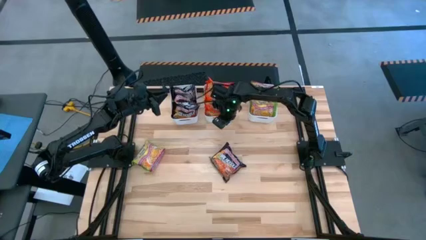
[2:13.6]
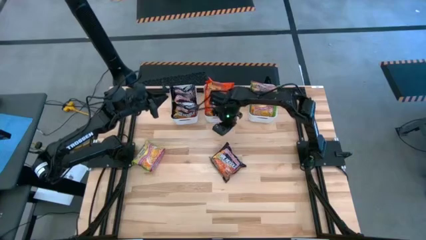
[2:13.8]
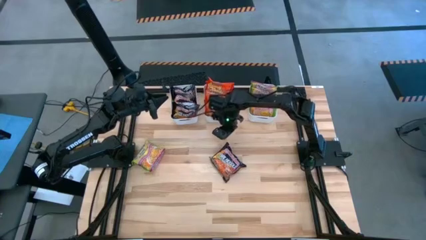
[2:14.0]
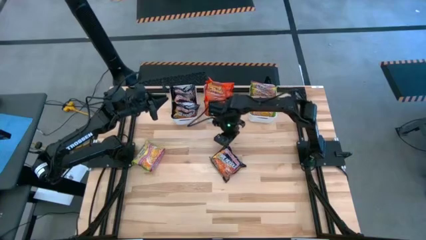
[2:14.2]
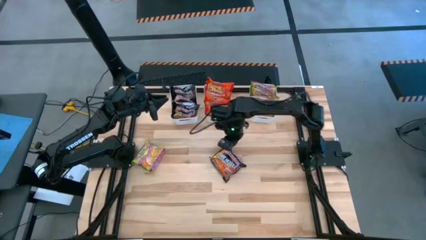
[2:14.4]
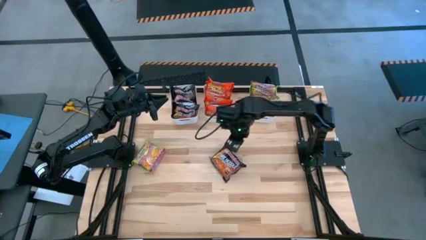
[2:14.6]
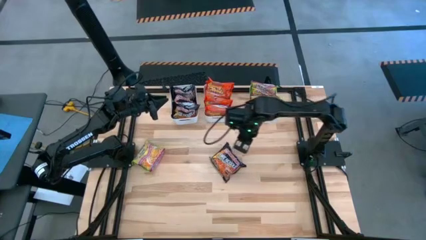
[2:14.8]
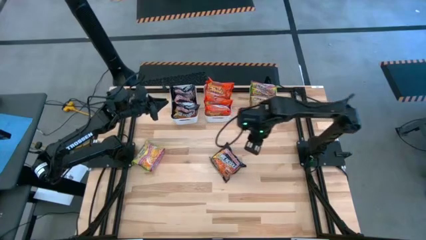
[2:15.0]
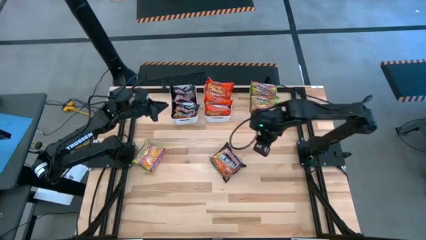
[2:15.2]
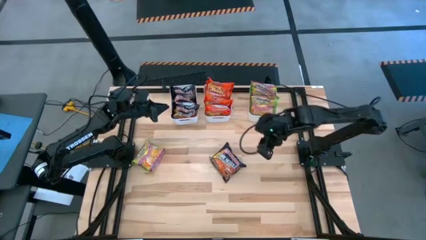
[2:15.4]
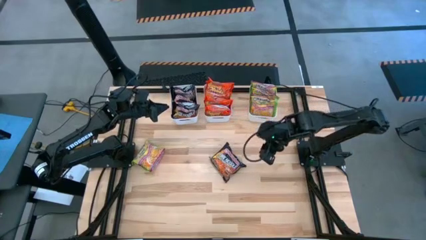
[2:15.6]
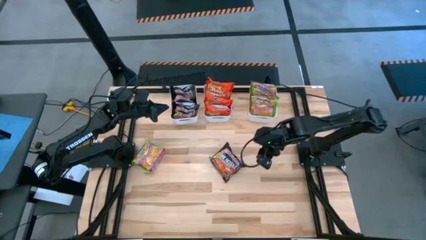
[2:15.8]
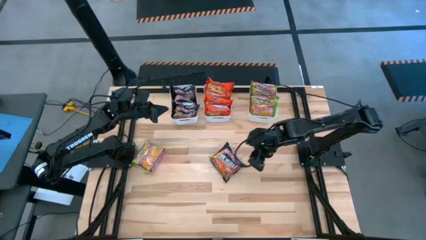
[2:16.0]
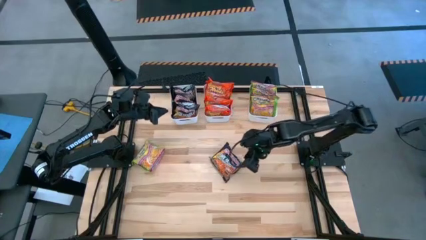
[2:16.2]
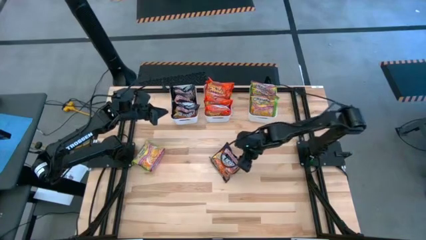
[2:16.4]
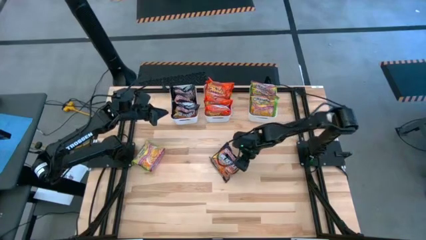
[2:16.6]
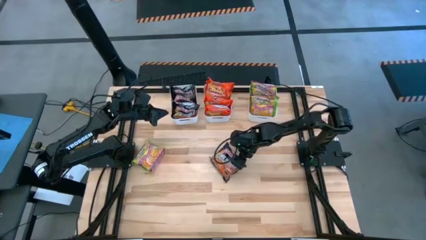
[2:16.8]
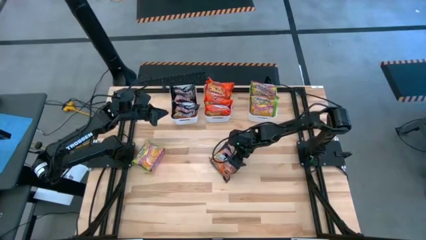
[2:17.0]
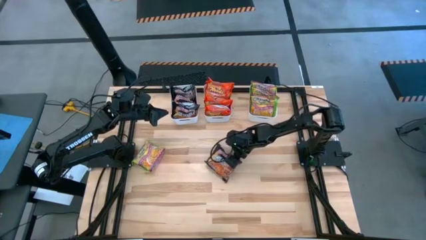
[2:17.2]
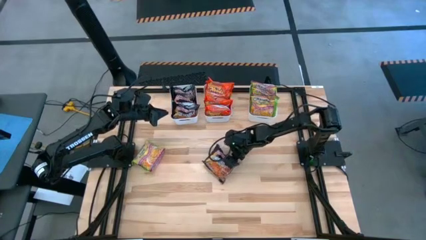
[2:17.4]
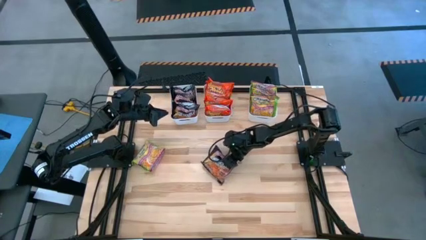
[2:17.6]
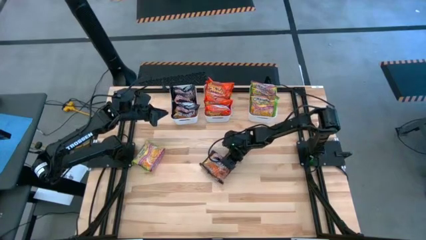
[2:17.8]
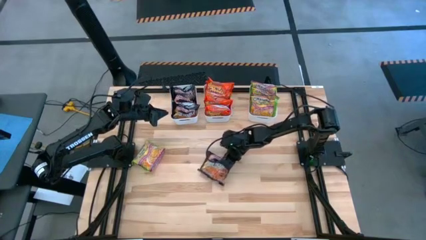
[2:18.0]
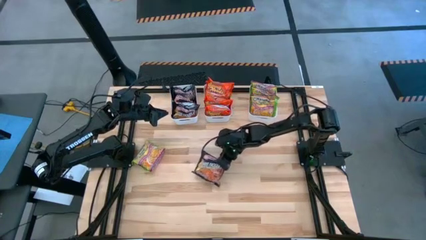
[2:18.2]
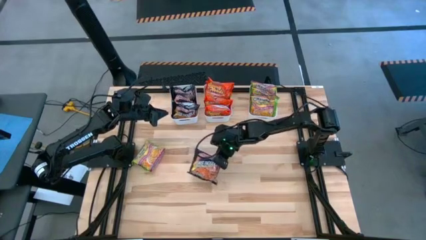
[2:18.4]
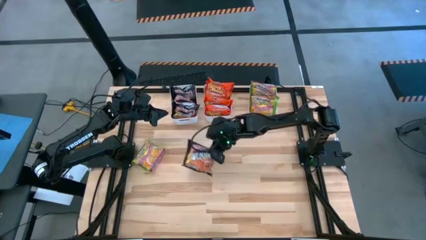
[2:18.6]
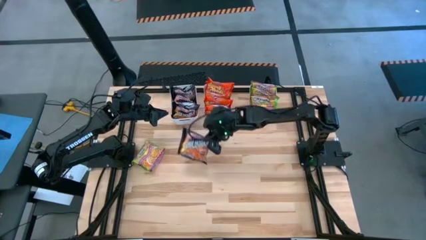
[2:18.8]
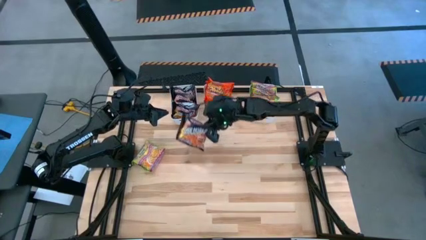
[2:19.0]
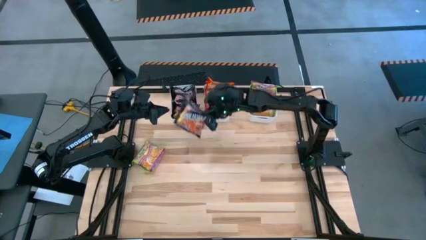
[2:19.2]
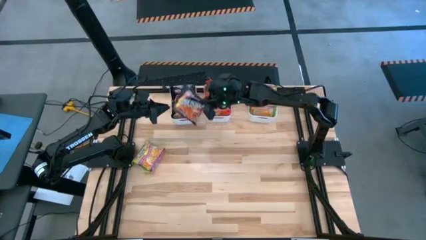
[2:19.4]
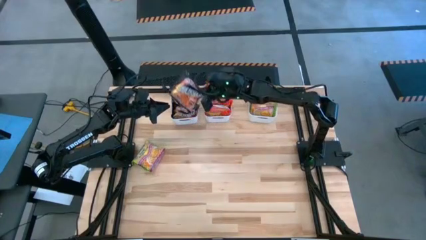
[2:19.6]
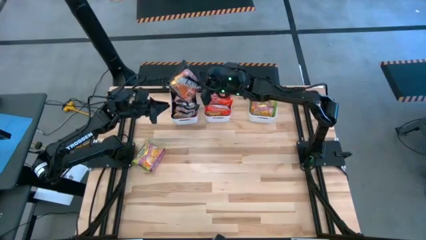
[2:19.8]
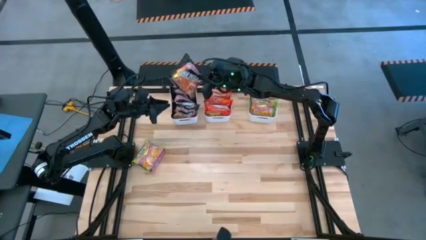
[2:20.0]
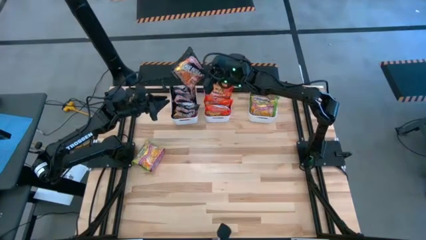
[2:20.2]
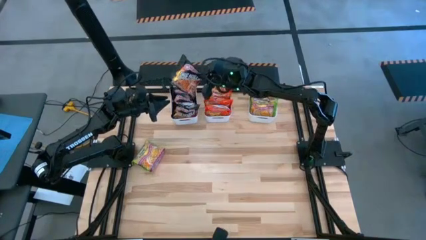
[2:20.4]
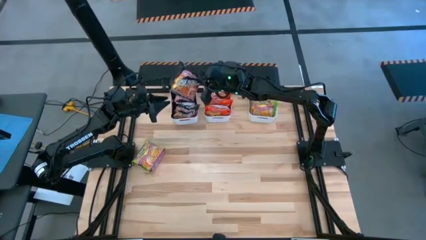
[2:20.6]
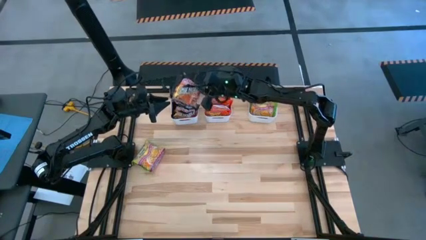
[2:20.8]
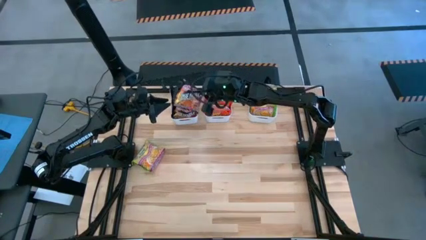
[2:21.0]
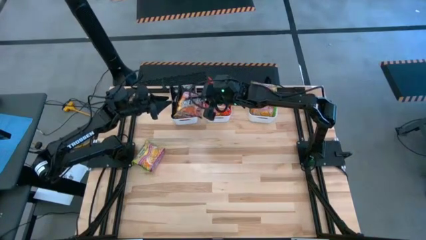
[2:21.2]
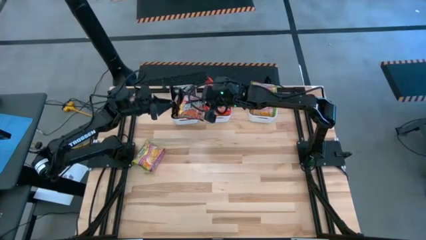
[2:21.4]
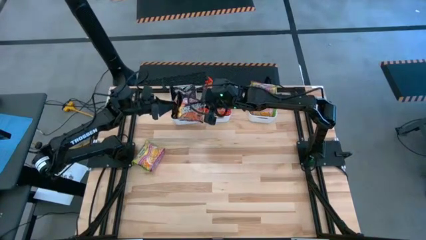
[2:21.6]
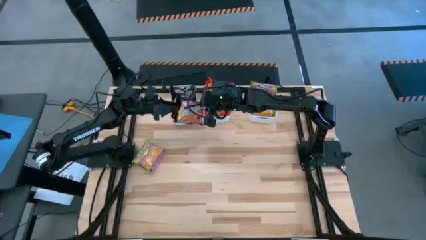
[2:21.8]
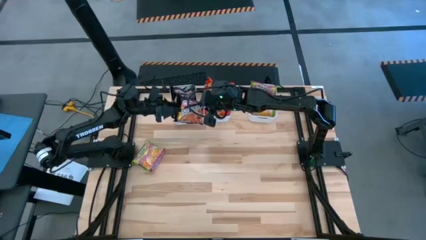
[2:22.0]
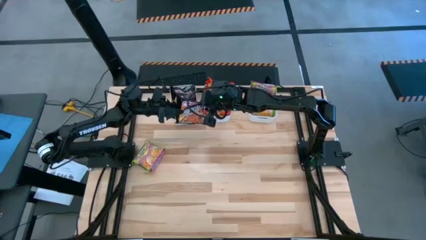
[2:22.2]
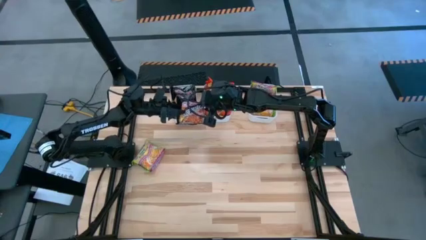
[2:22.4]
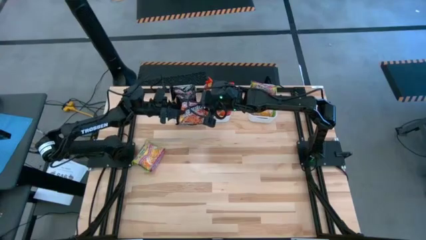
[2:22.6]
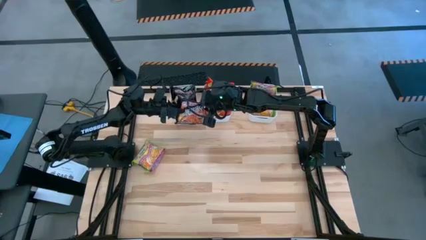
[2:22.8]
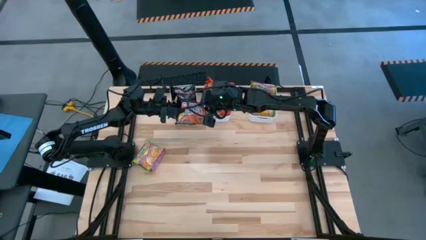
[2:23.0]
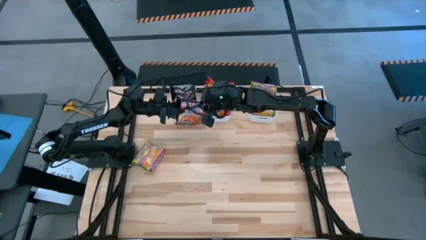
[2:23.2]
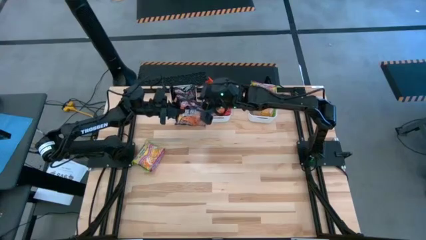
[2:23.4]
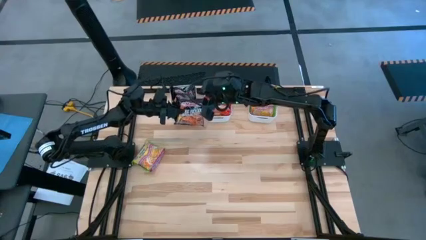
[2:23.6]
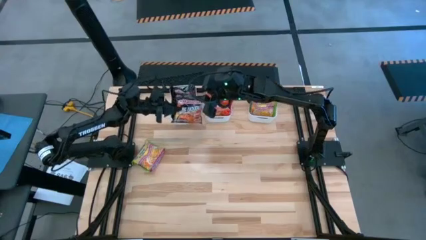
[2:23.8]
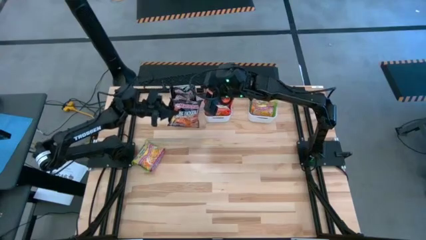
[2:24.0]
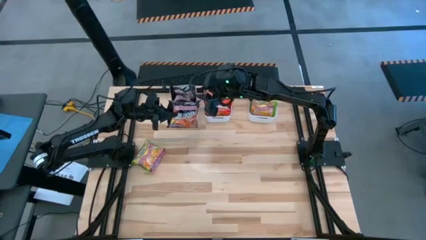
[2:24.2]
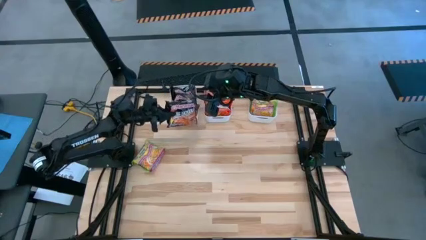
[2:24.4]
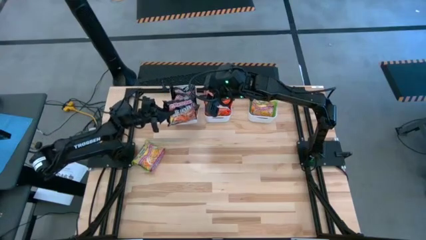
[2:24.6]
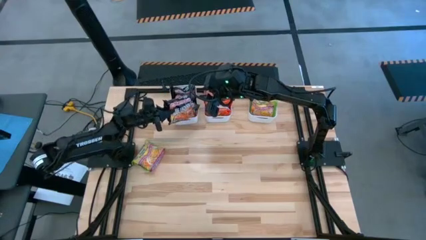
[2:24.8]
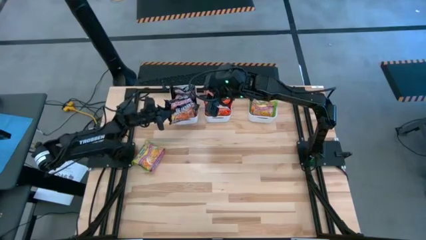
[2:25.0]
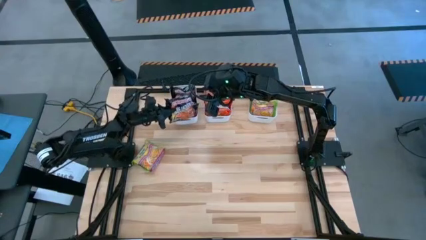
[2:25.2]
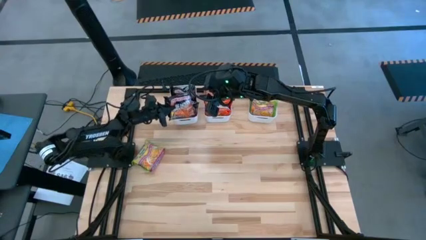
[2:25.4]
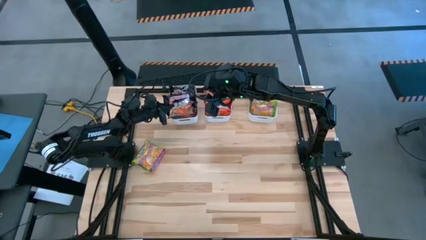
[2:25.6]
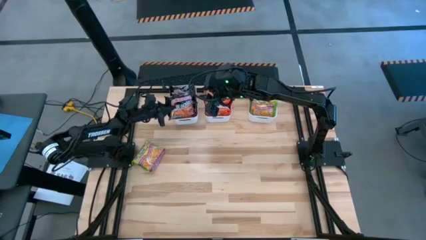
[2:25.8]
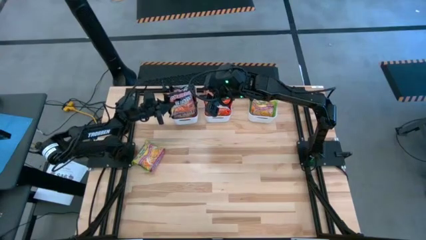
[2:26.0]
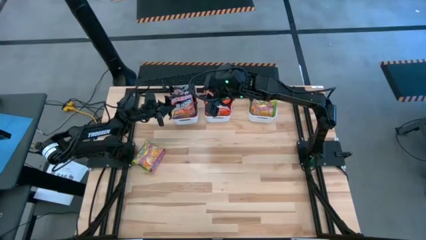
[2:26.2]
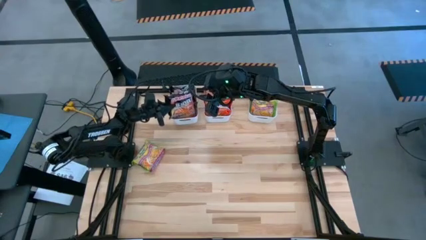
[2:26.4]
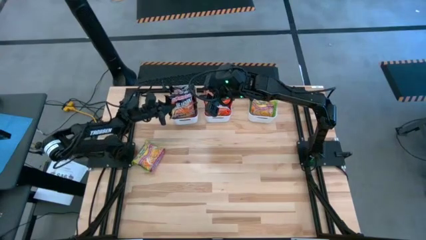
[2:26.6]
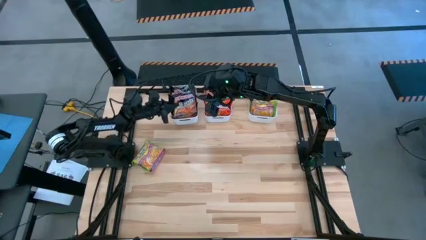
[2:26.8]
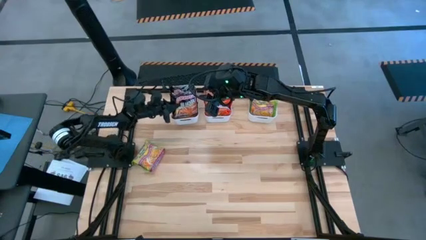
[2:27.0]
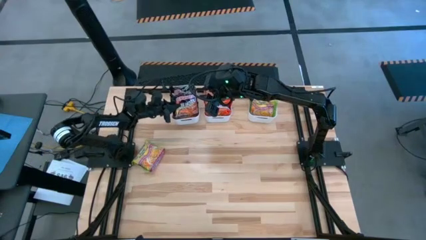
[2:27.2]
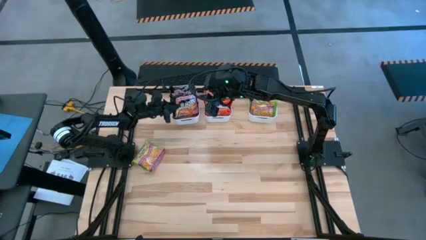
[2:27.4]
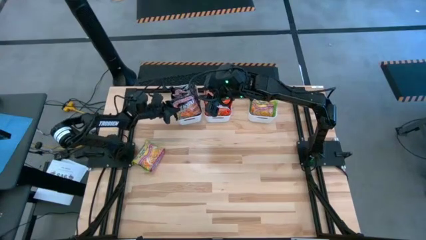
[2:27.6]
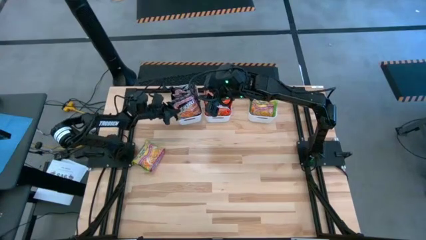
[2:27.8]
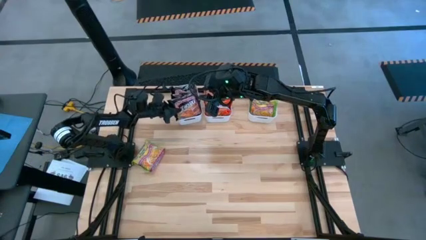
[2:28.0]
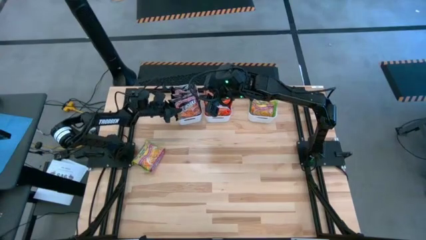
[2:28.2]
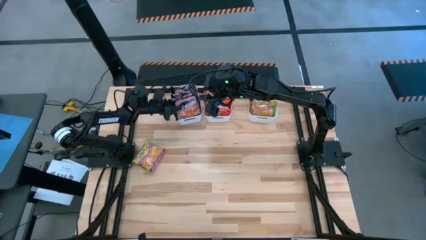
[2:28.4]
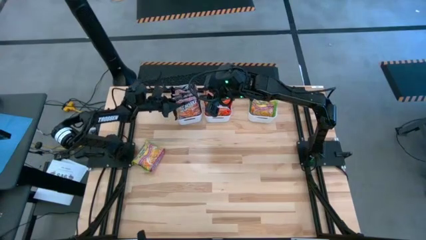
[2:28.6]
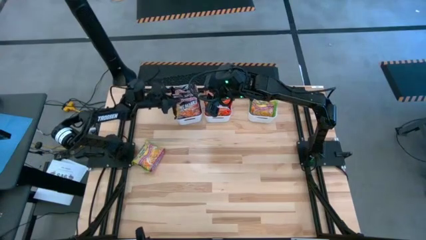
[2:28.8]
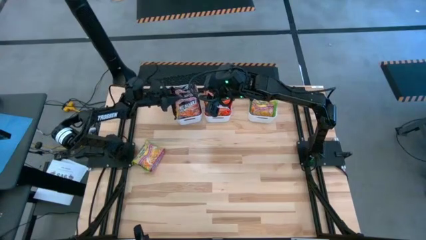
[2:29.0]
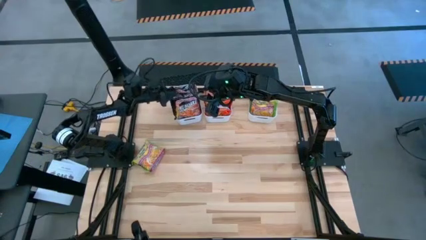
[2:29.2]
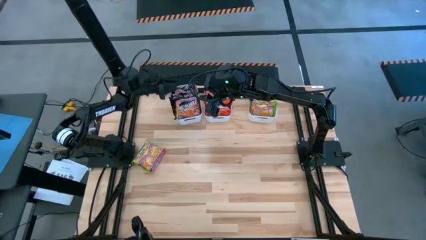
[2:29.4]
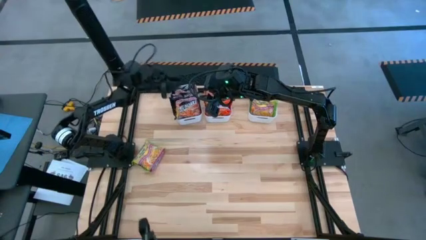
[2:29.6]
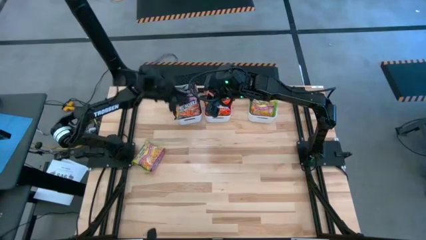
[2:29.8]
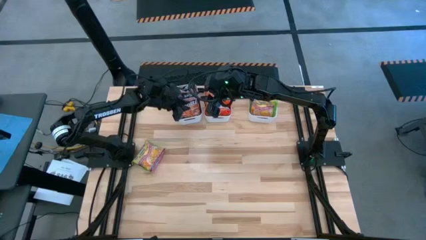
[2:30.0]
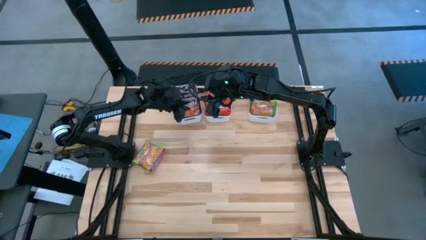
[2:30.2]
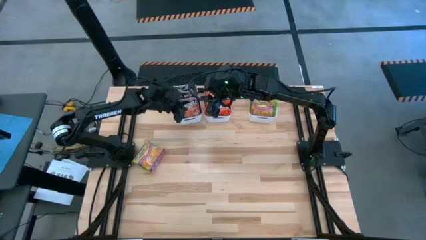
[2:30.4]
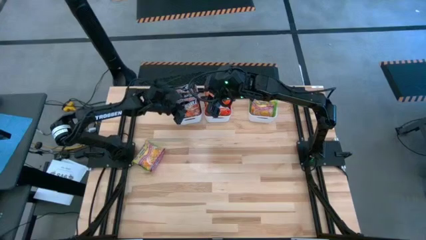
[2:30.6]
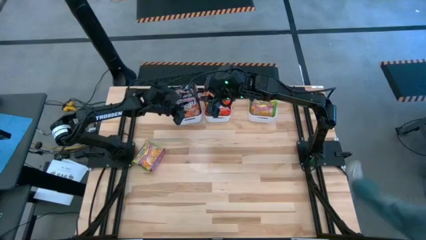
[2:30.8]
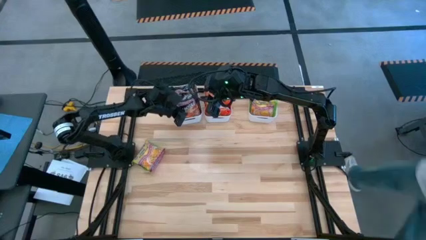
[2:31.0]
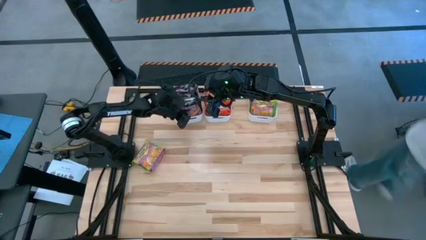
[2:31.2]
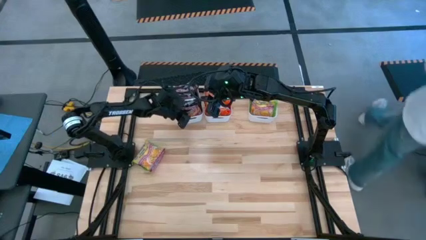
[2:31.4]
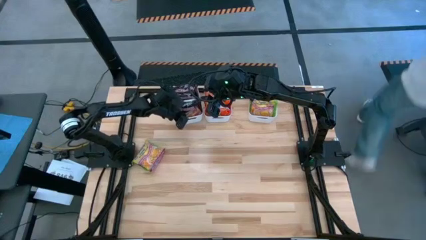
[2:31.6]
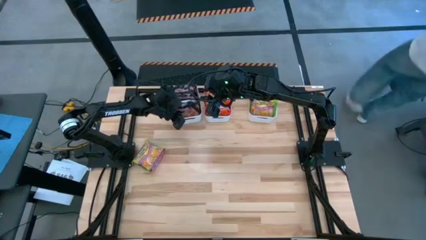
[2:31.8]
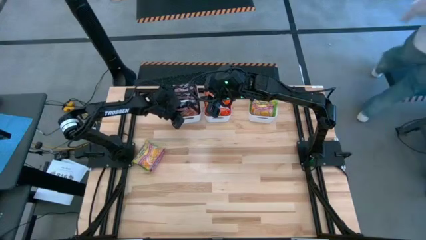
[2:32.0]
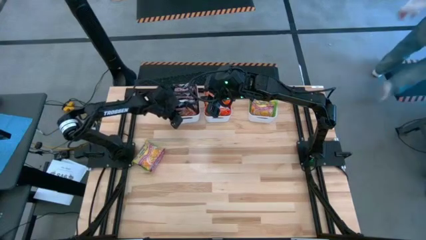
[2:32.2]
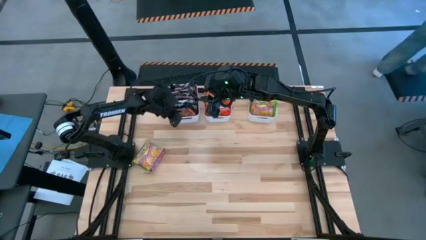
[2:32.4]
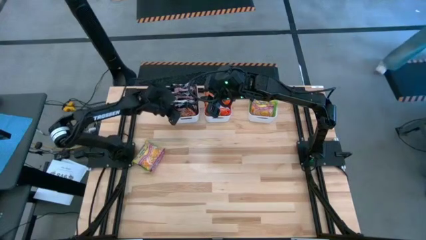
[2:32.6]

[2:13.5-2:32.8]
Task: Sort Maruchan noodles
Put the black noodle pack into the left white bin
